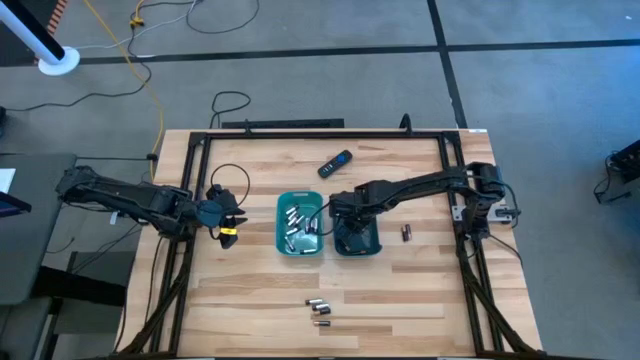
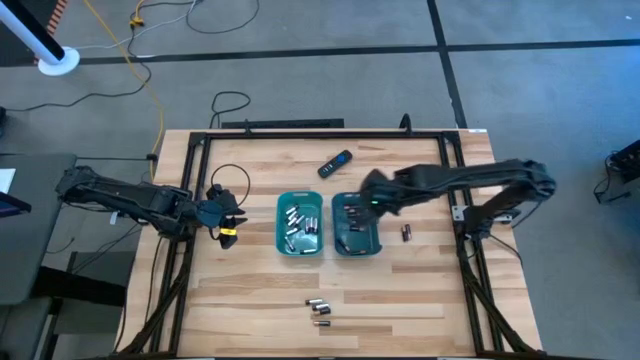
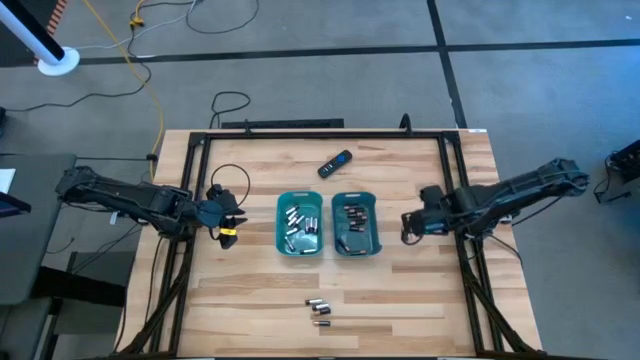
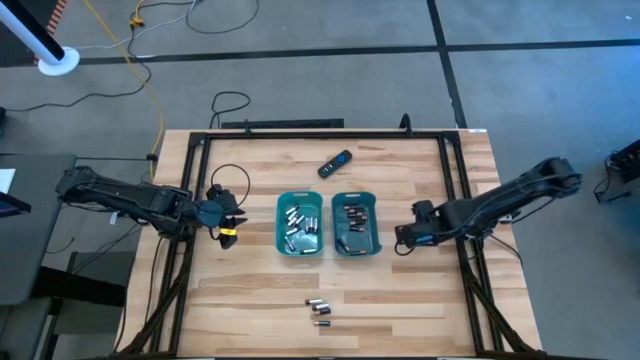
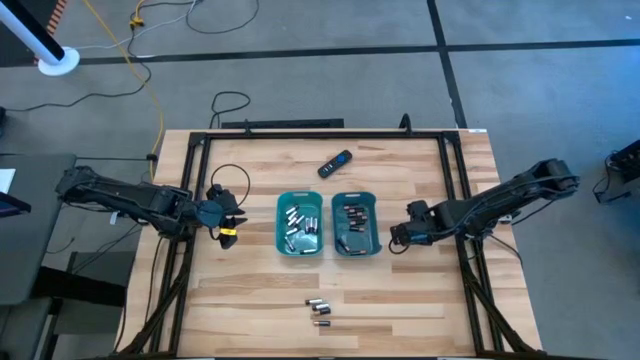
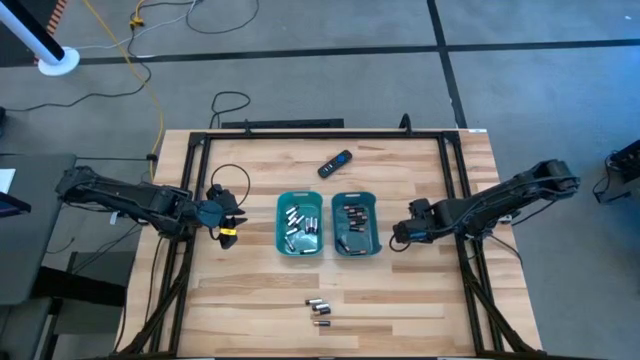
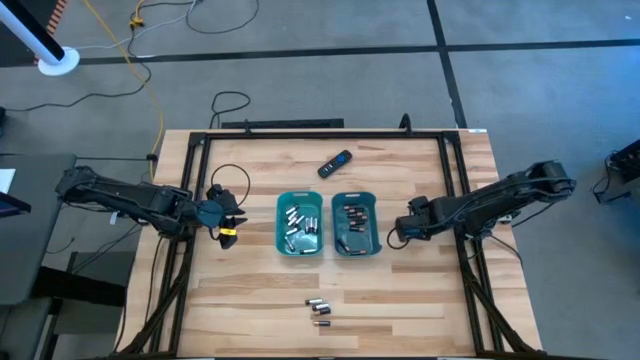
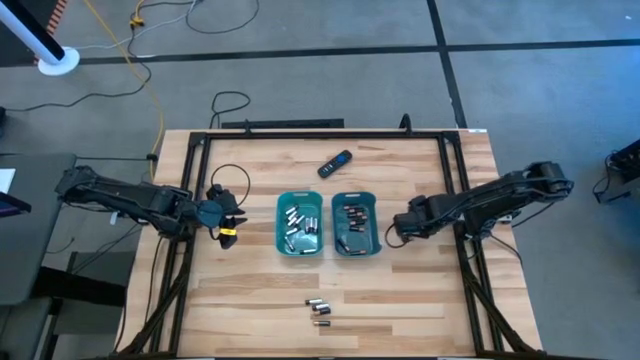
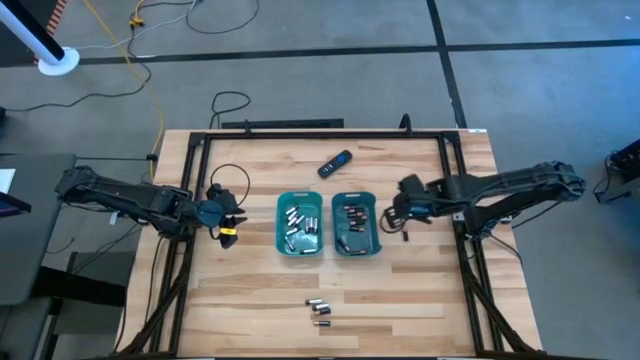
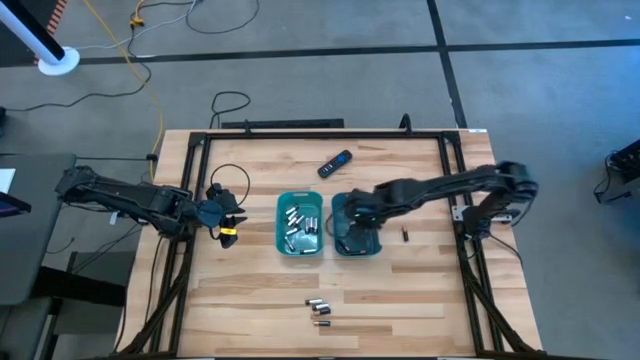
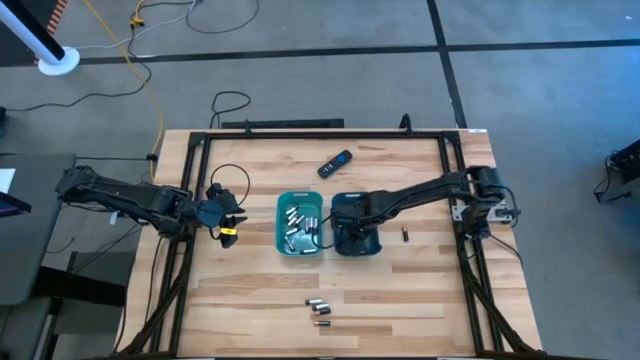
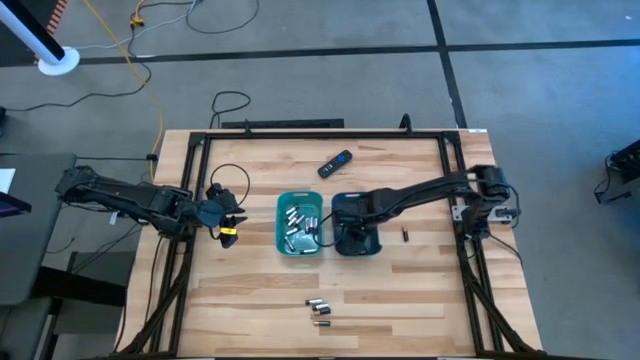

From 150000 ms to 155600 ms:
Task: Sort batteries
Put the copper and black battery into the blue bin

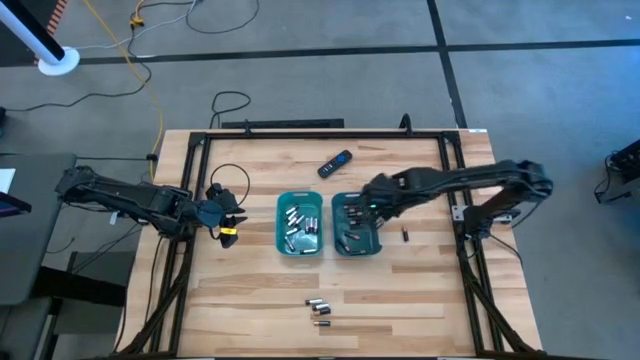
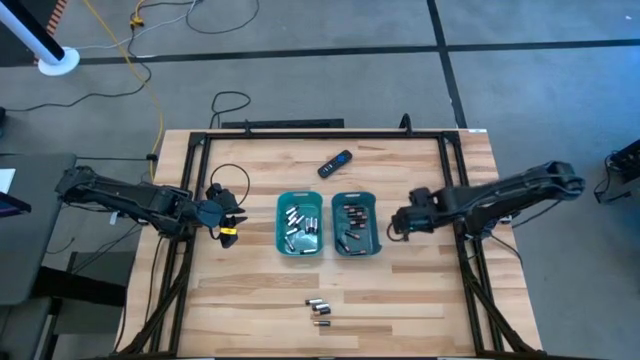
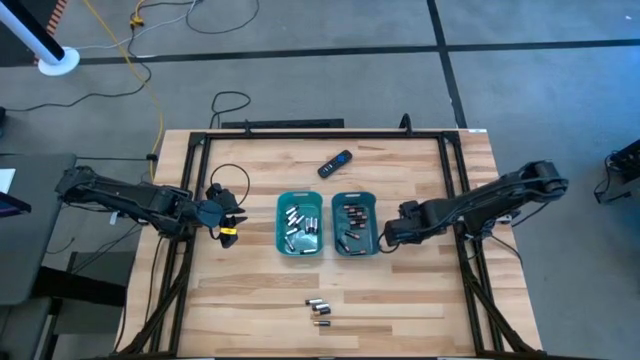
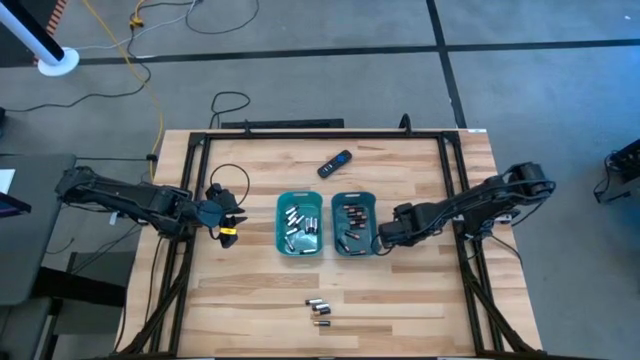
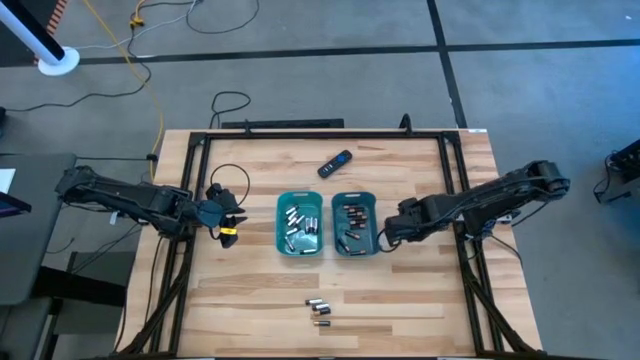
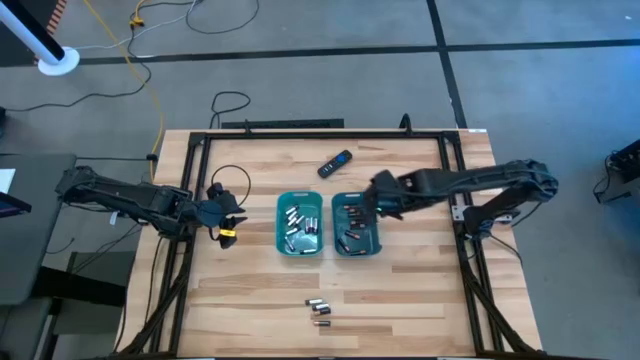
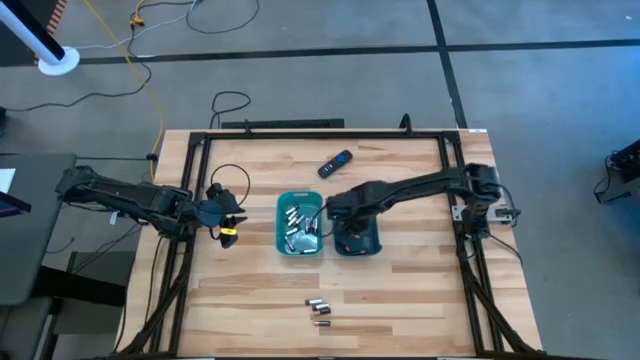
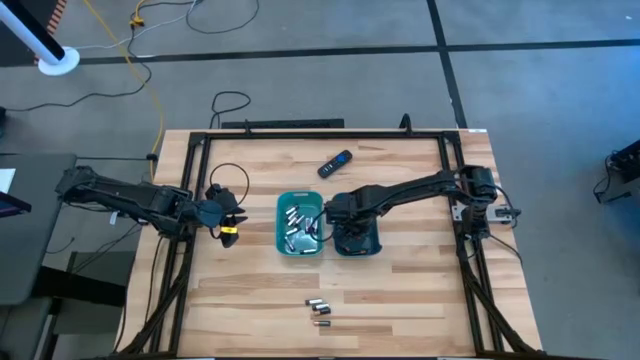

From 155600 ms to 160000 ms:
Put the copper and black battery into the blue bin

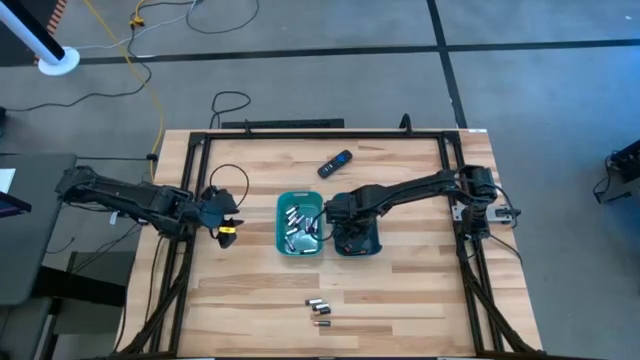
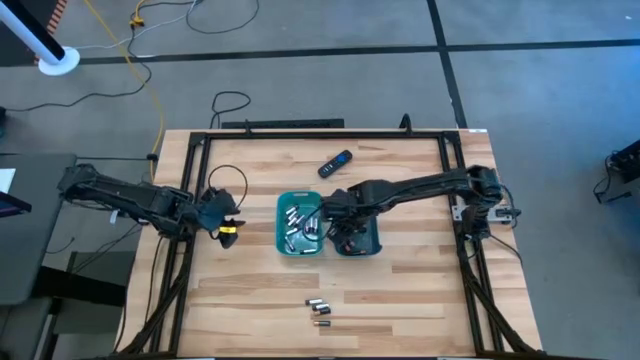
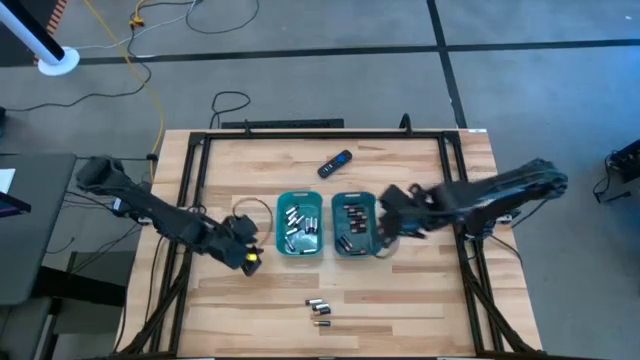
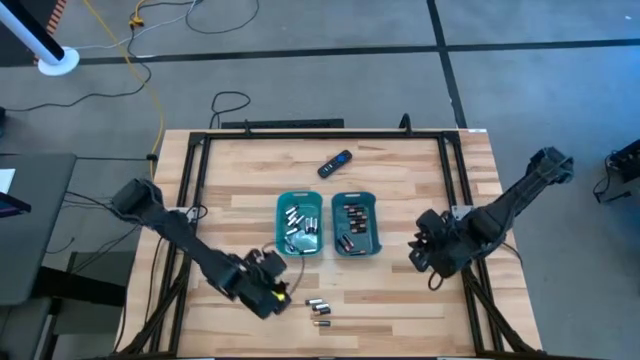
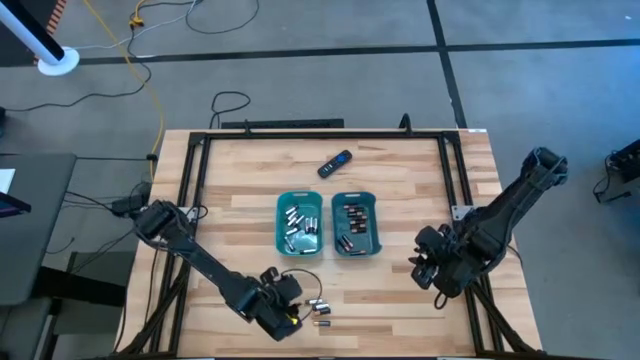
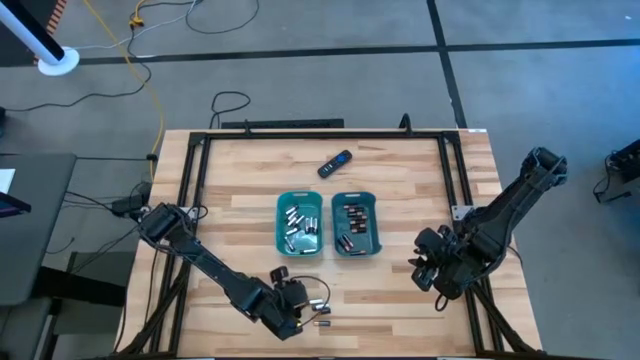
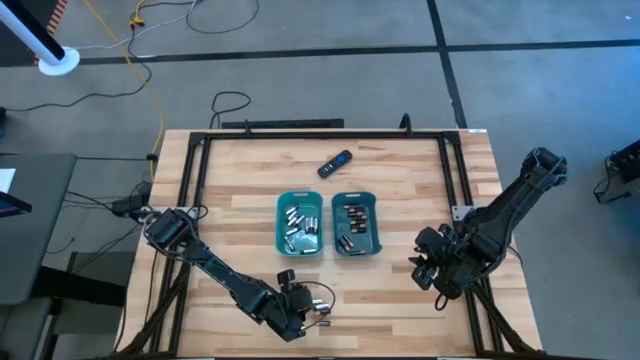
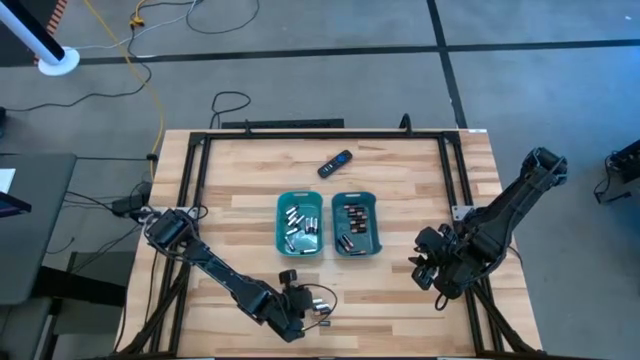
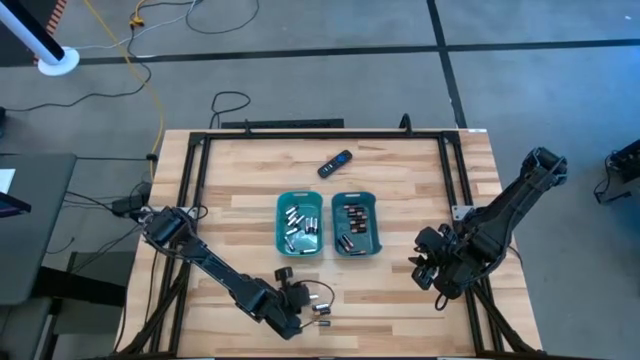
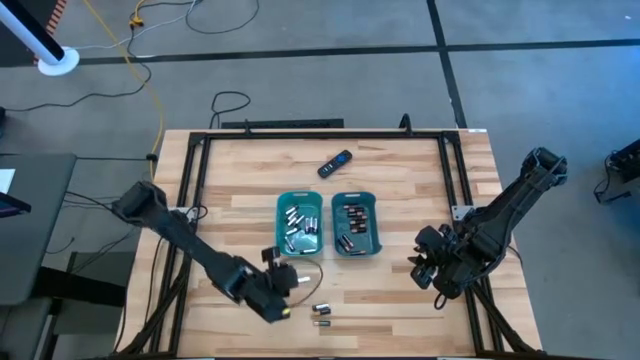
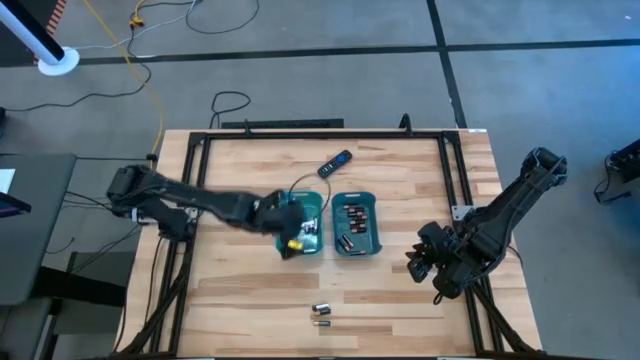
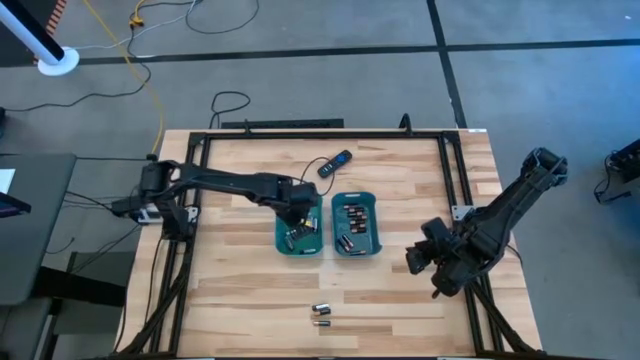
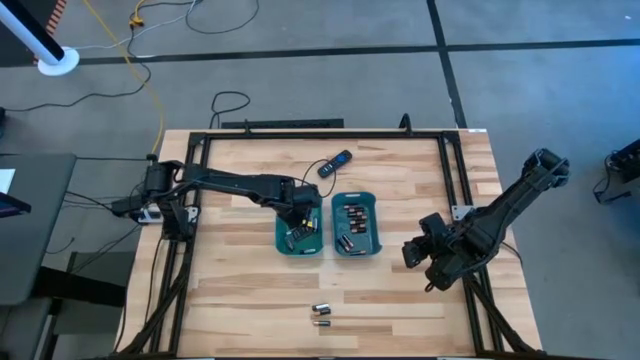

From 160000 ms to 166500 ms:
Put the silver and black battery into the green bin

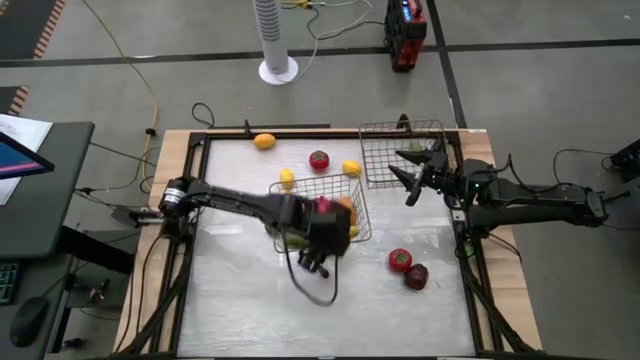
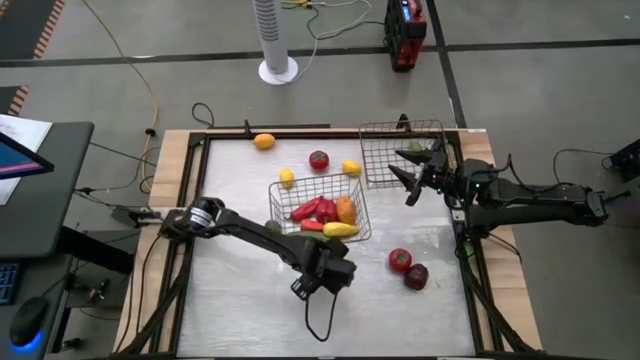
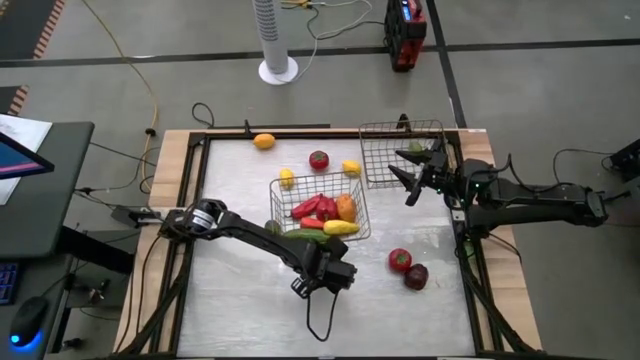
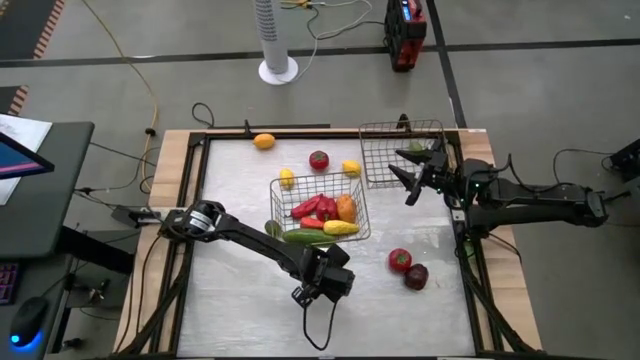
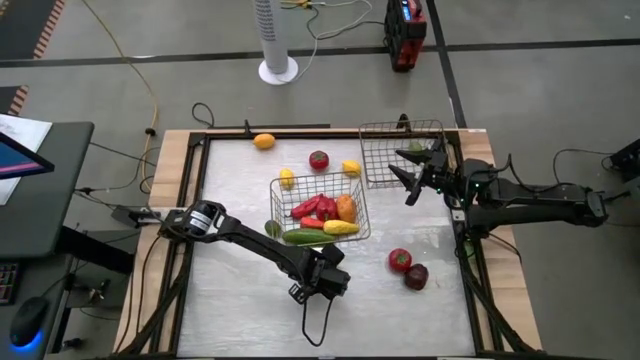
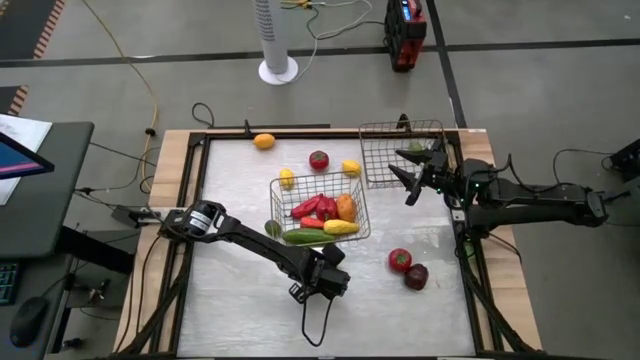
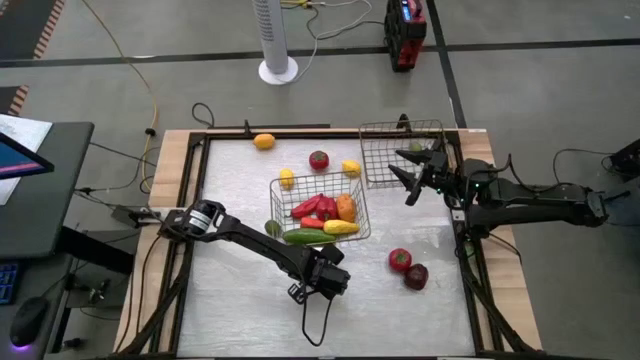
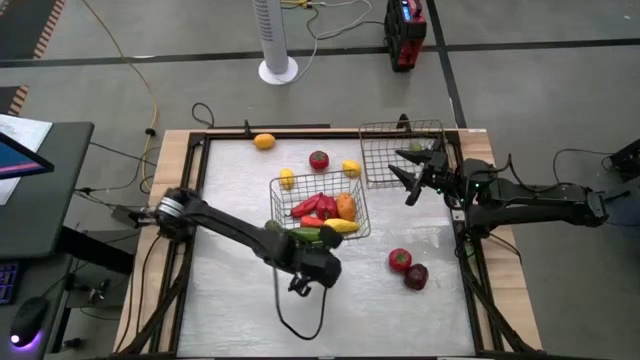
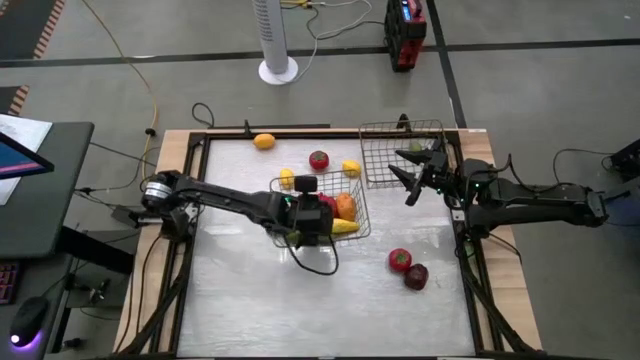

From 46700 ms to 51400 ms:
Task: Sort produce into baskets
Put the violet eggplant into the left wire basket
